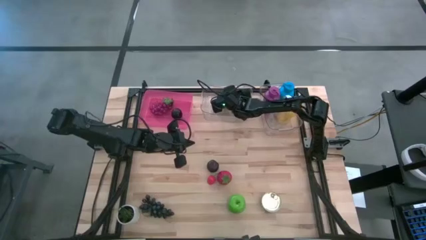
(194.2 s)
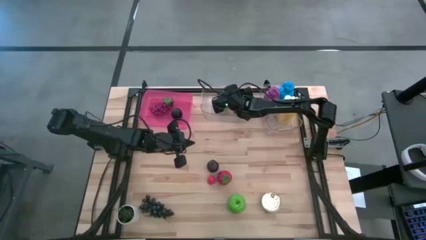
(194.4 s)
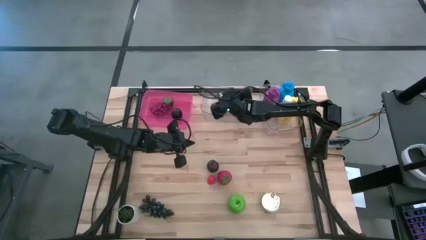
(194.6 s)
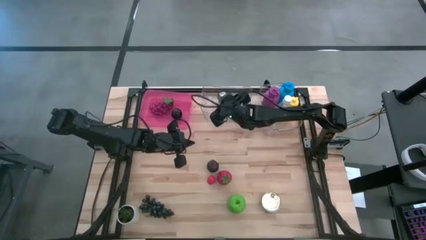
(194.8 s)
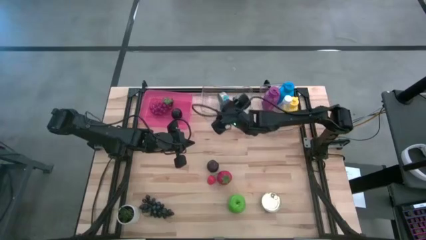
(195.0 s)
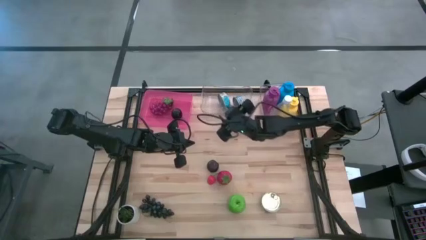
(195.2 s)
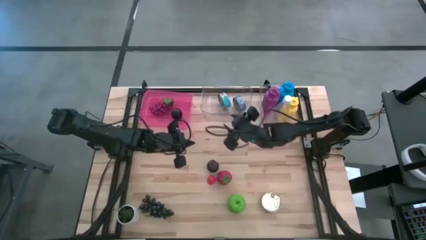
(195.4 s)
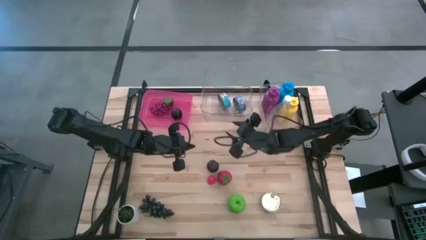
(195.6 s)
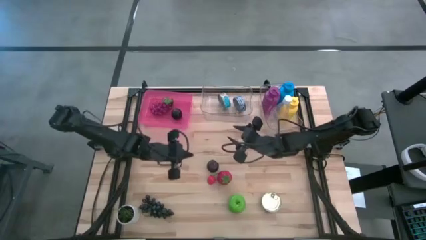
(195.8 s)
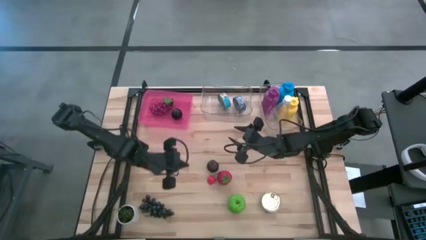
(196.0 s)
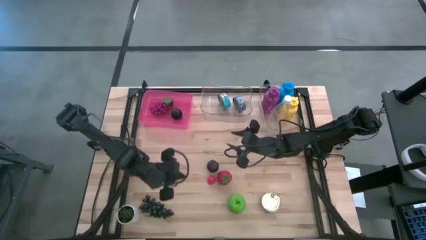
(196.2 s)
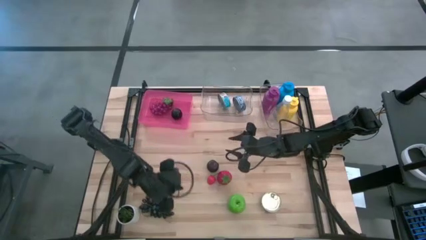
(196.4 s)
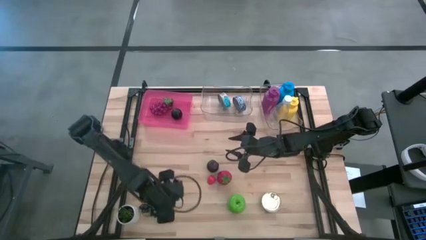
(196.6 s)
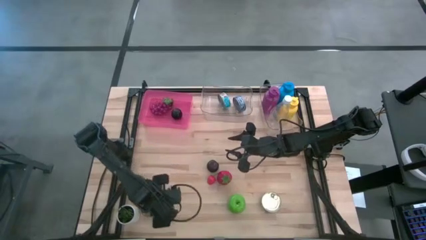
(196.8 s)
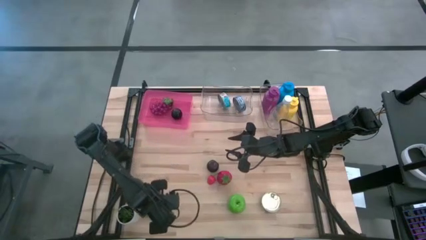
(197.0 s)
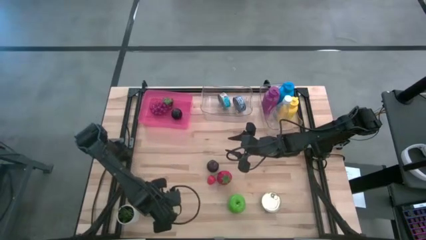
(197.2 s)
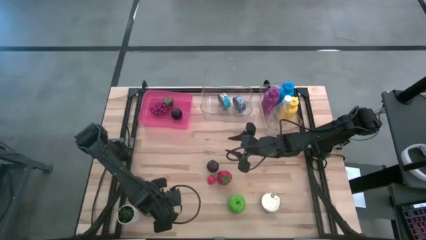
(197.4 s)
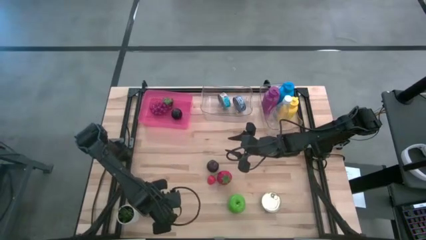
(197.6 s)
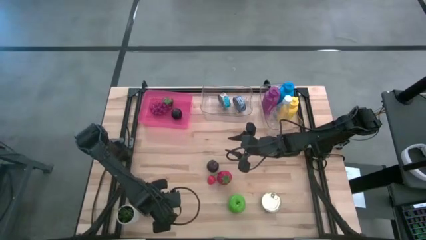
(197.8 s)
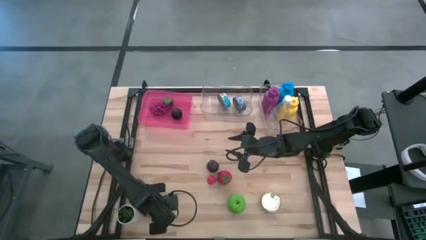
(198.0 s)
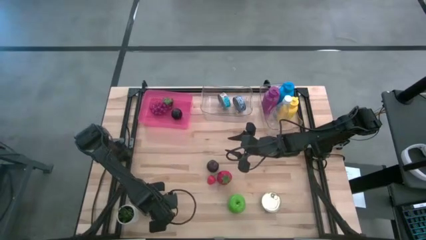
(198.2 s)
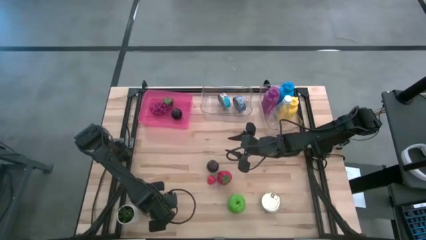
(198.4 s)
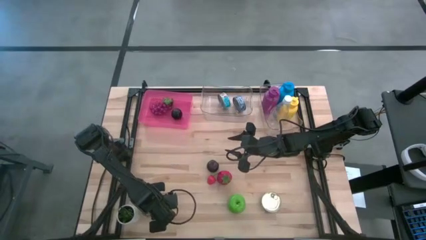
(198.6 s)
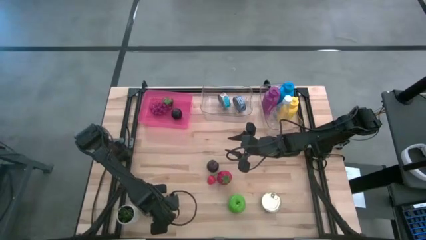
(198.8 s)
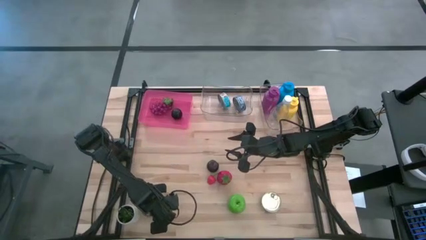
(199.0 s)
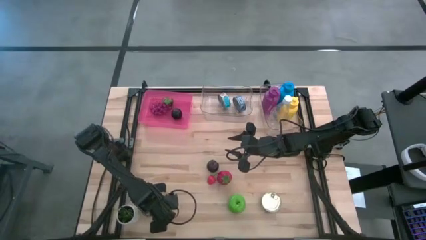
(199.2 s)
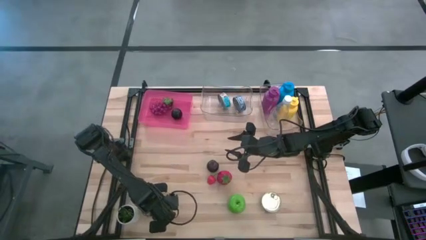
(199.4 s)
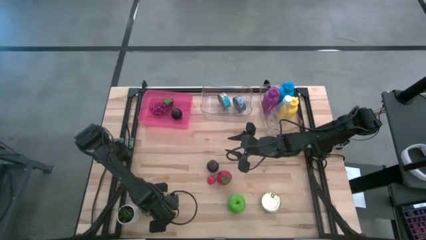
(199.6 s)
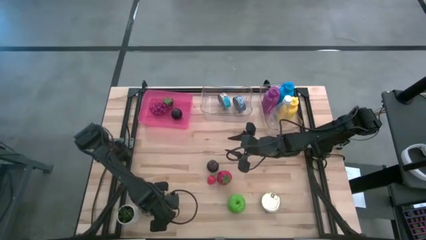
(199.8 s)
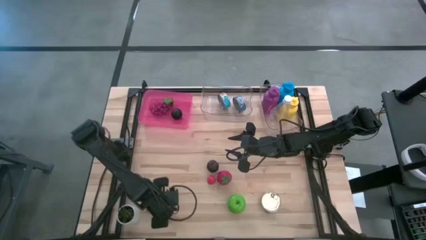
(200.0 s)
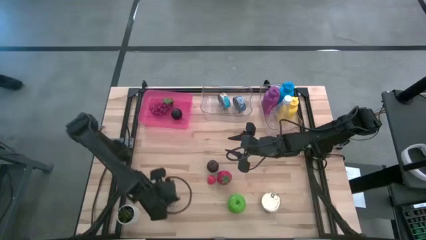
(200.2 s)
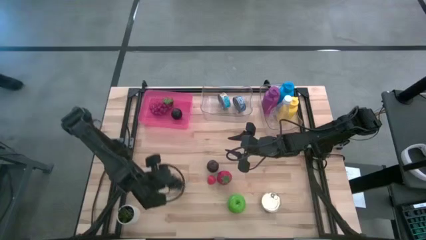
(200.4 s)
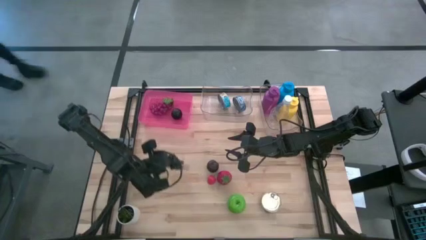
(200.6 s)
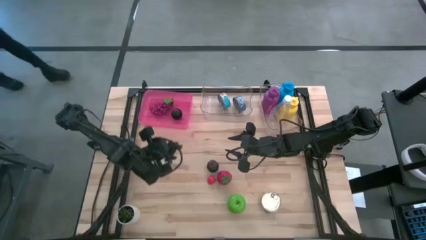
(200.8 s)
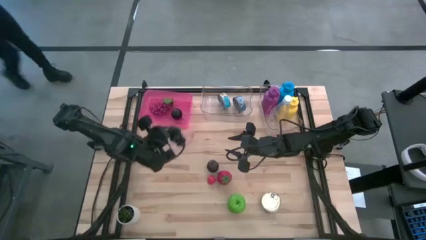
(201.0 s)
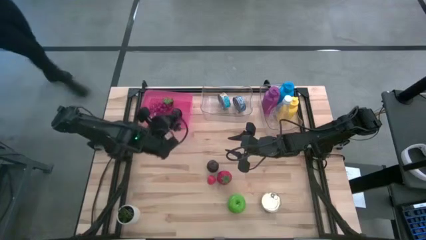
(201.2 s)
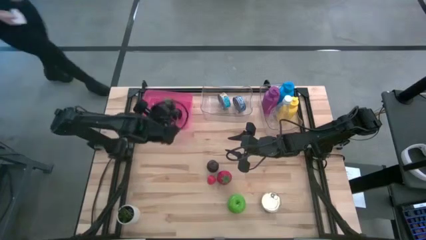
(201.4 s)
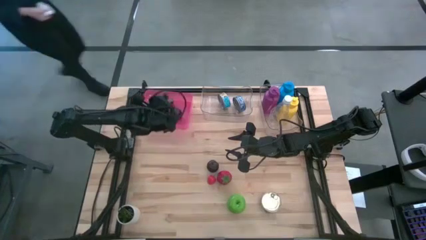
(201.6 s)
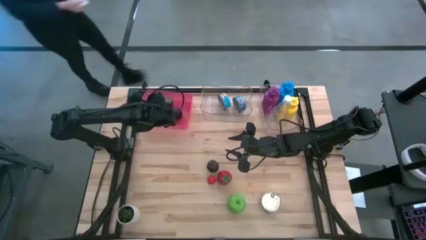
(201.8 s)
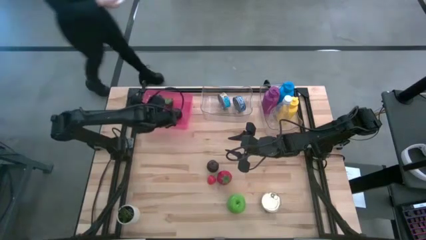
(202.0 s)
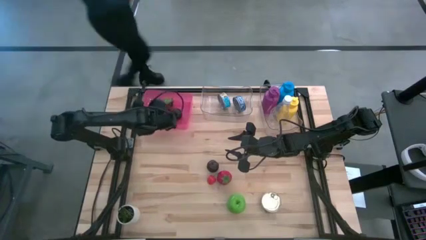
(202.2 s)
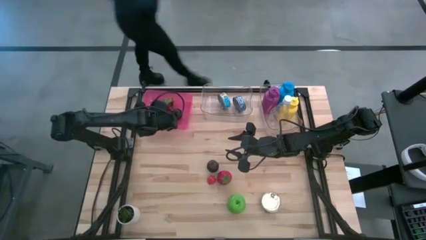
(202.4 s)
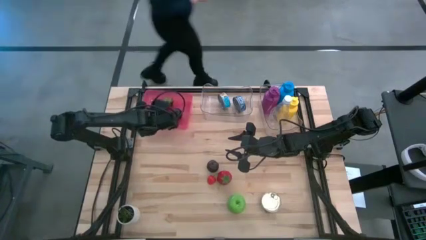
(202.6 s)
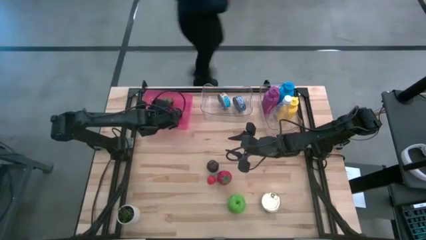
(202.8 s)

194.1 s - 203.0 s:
Task: Pick & Place Food Item
Put the black grapes into the pink bin

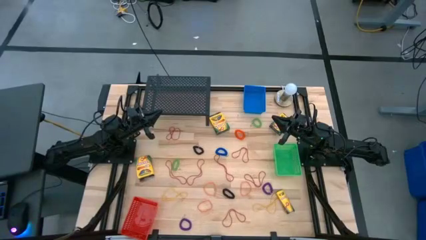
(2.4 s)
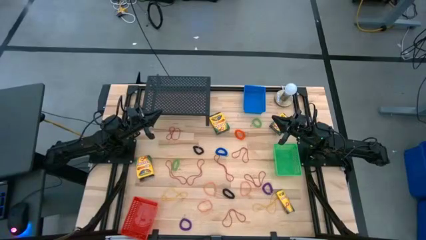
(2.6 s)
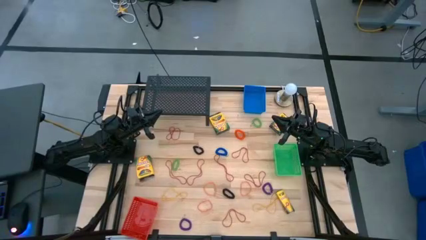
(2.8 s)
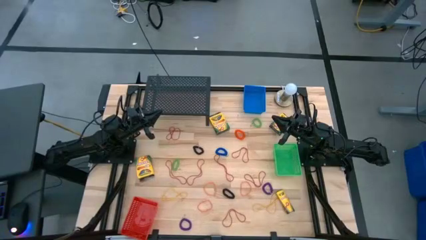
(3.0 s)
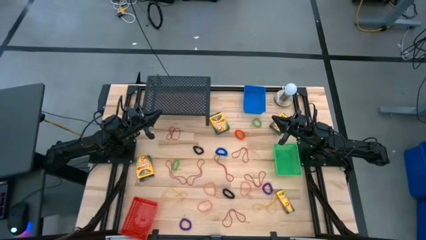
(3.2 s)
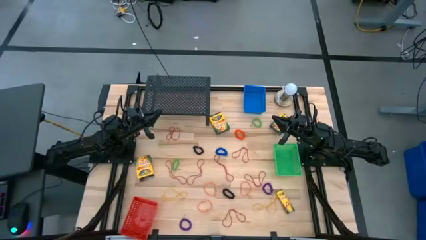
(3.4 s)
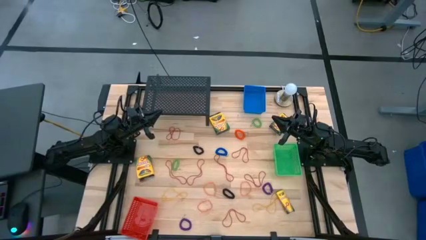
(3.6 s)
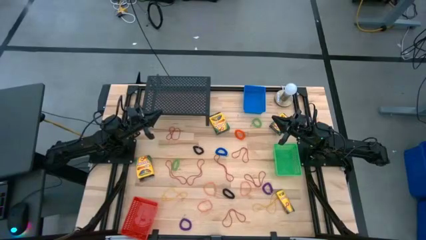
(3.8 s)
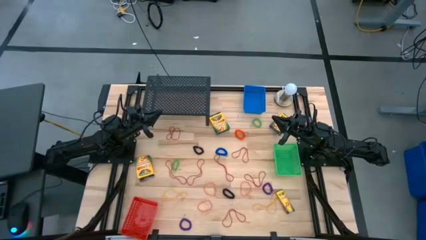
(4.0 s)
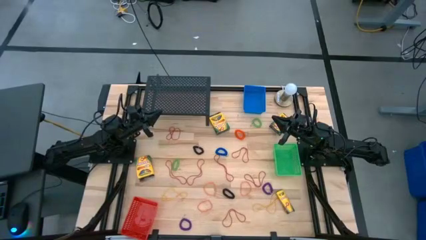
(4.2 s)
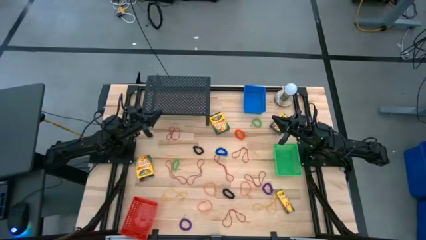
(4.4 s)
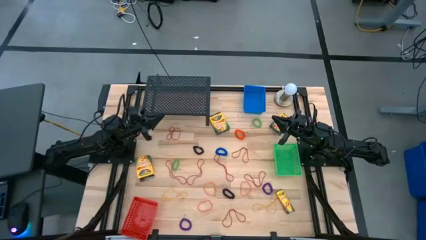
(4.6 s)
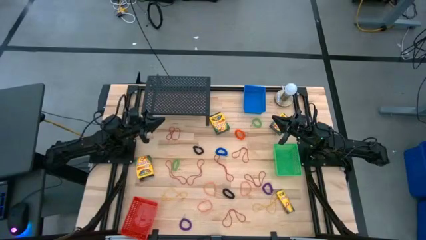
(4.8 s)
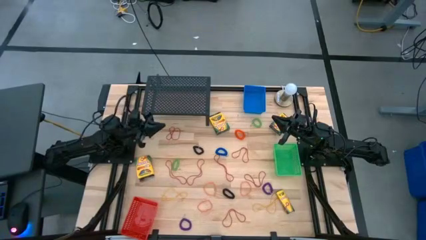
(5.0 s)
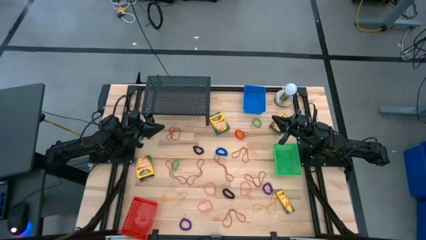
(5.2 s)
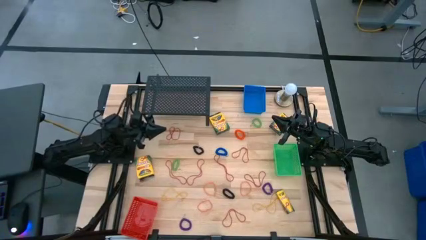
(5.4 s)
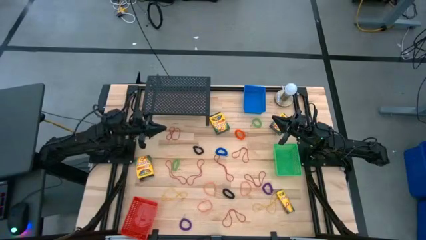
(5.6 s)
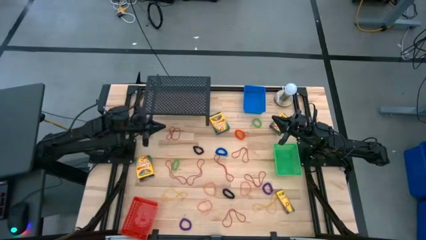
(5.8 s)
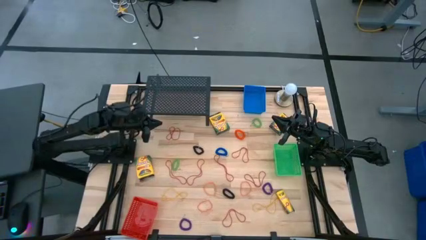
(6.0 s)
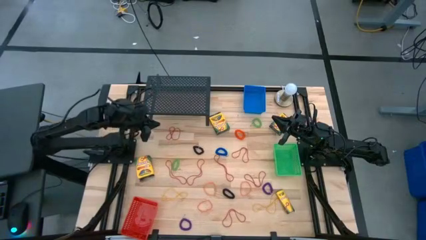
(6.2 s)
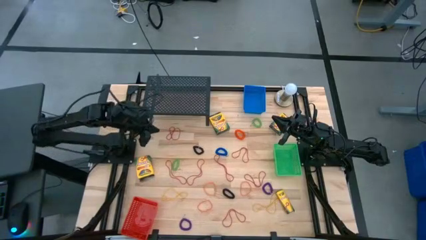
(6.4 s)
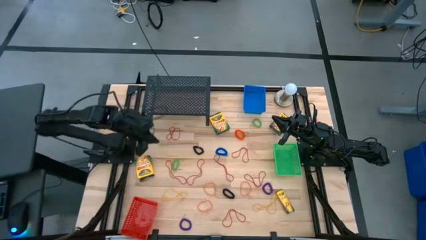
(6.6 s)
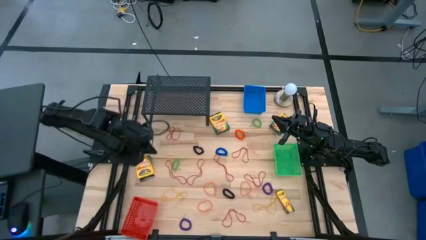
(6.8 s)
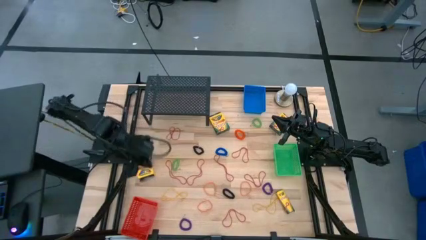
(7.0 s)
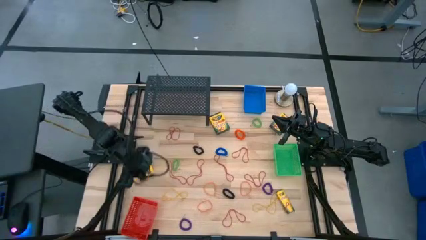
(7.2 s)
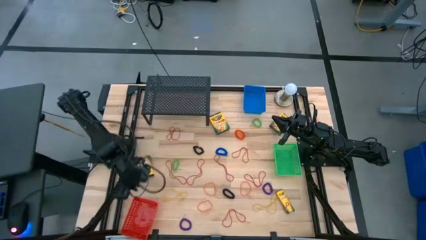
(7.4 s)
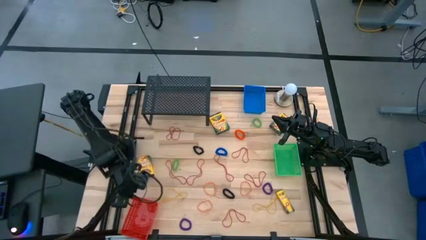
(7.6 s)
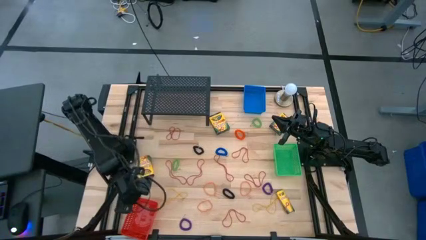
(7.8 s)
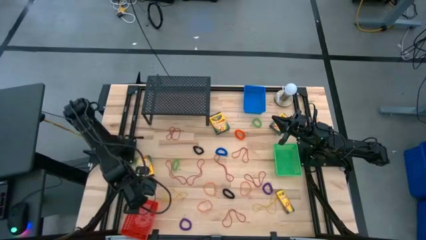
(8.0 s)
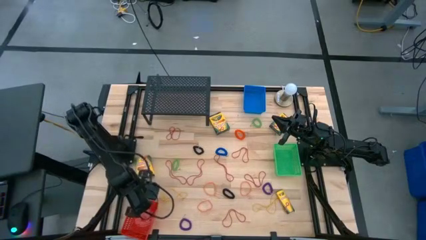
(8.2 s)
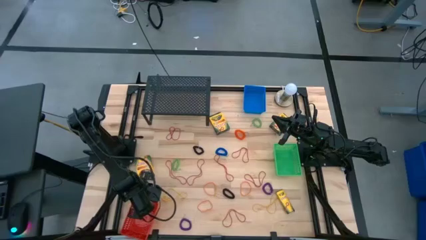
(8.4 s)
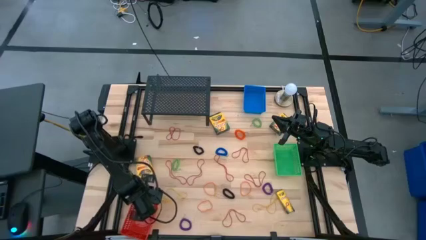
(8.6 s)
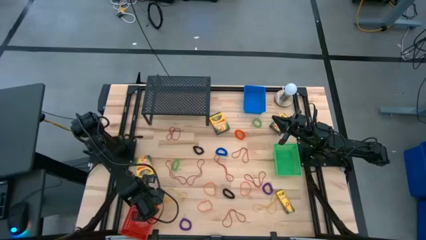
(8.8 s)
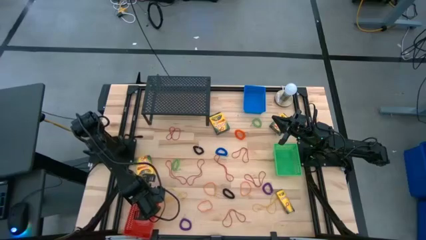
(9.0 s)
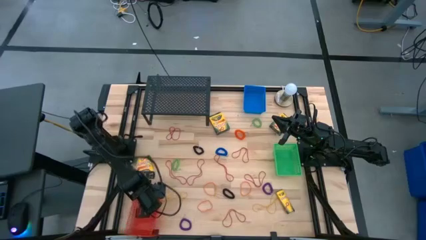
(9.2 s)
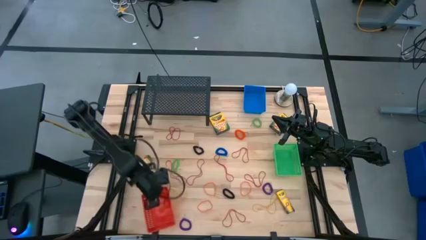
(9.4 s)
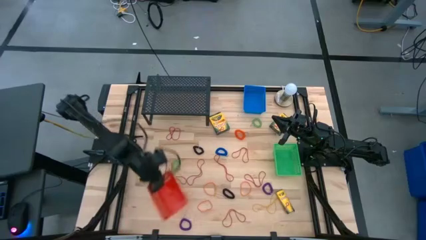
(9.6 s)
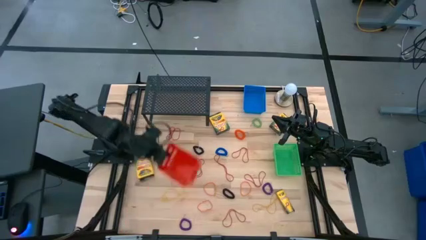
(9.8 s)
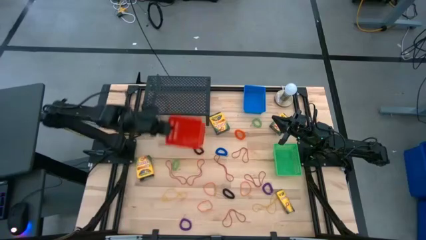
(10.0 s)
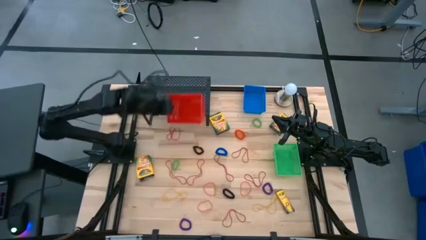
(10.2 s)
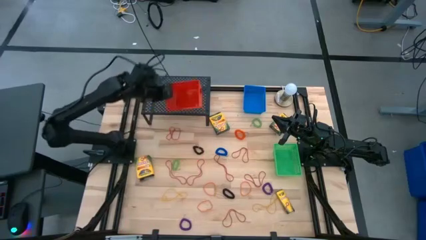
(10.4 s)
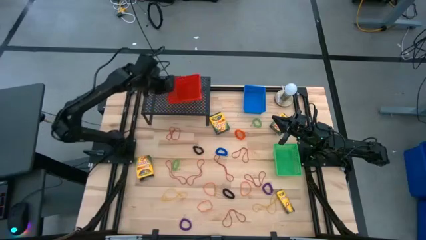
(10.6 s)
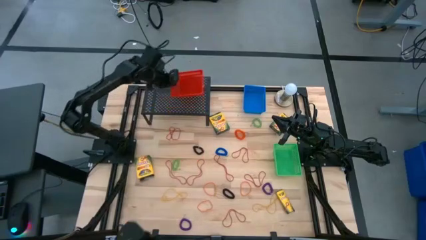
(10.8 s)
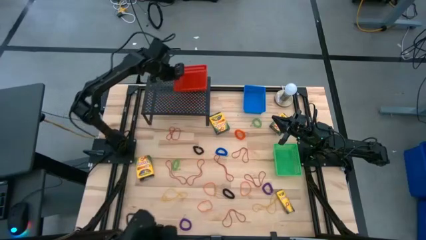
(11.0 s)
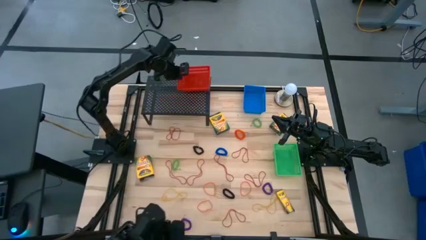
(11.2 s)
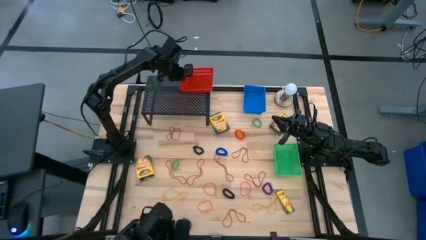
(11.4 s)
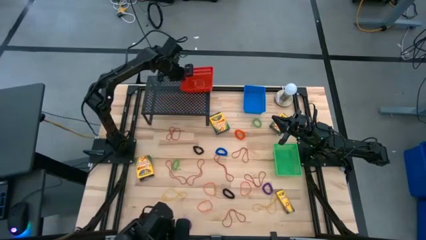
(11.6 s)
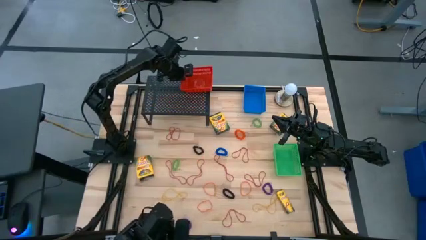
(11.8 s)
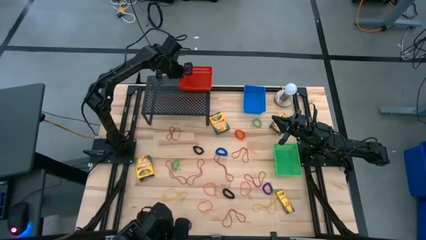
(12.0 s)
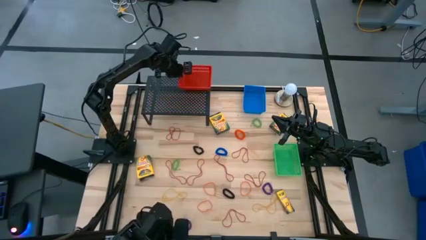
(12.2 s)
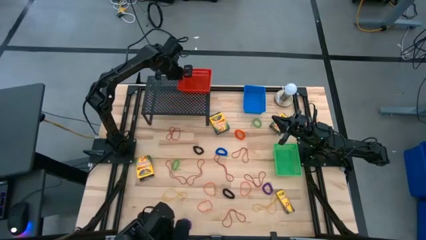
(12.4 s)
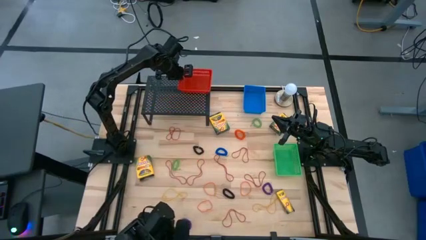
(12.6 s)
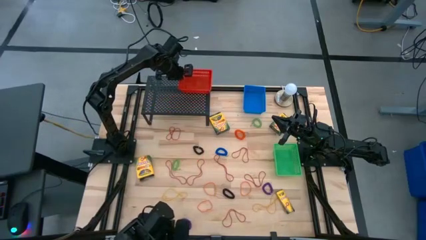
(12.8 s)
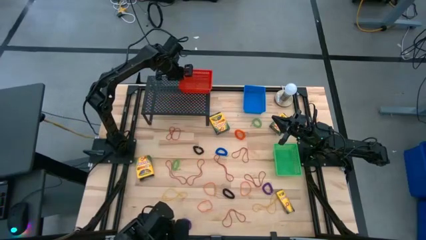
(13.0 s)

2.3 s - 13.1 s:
Task: Pick & Place Office Desk Supplies
Put the red bin on the shelf
